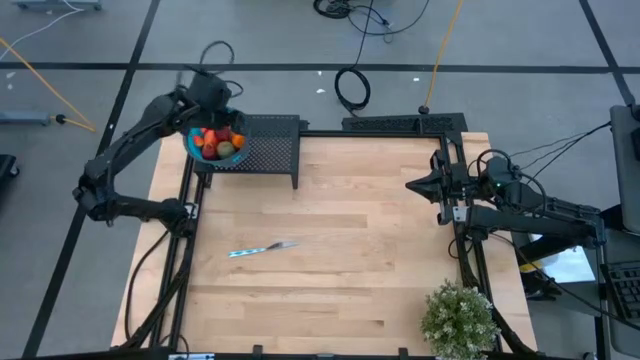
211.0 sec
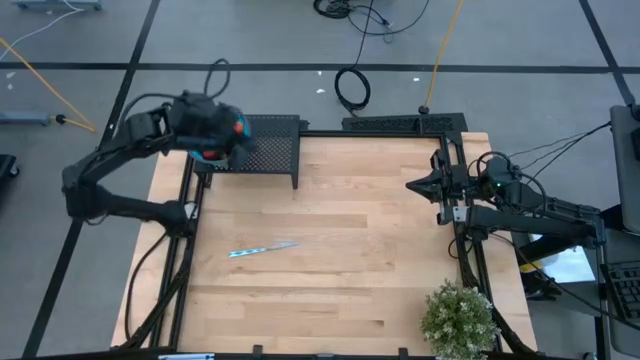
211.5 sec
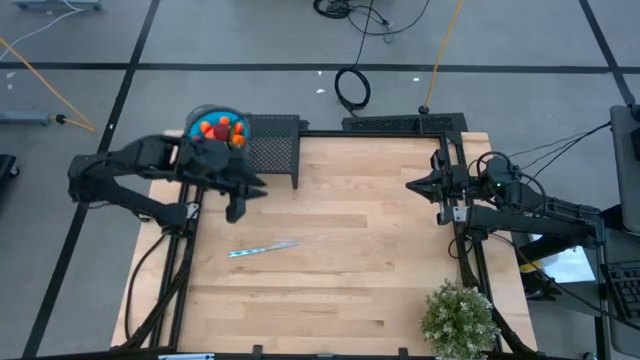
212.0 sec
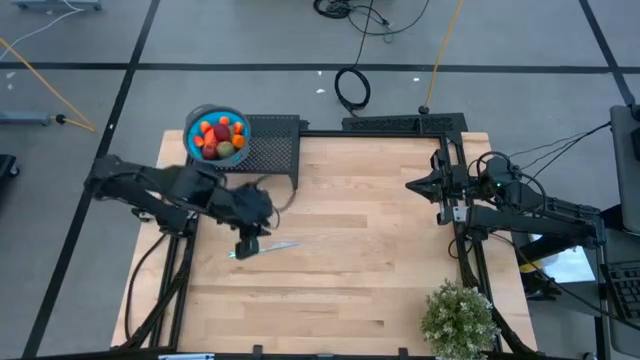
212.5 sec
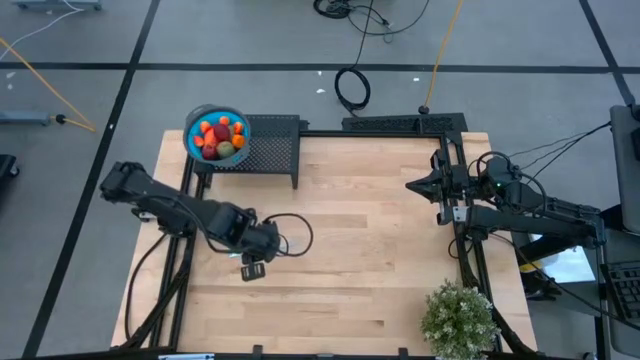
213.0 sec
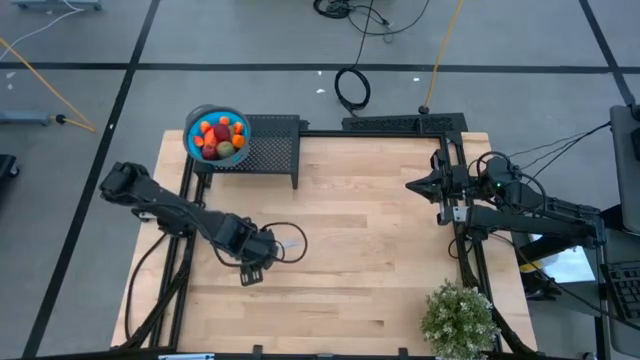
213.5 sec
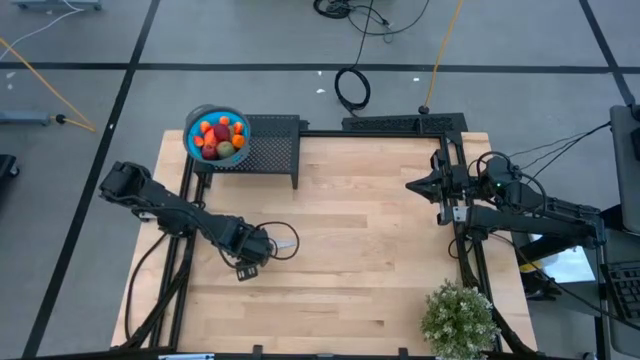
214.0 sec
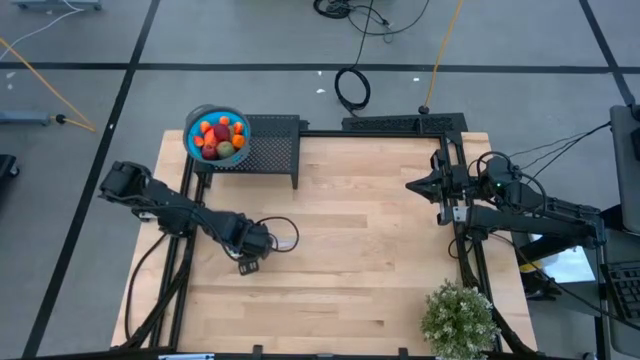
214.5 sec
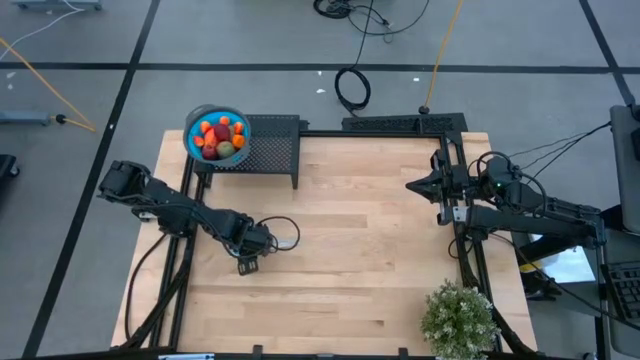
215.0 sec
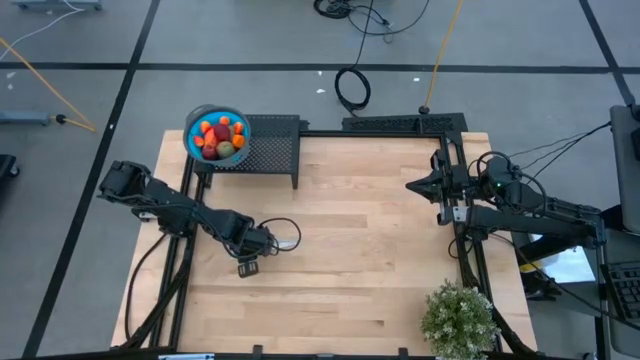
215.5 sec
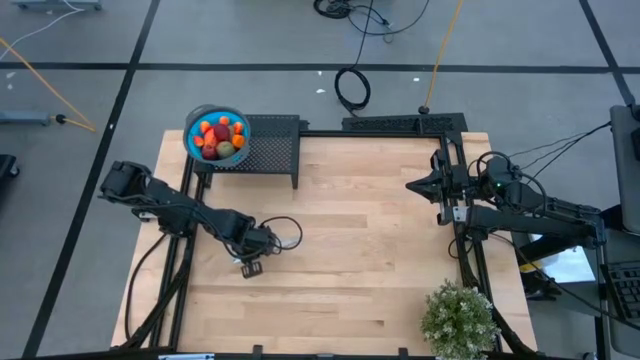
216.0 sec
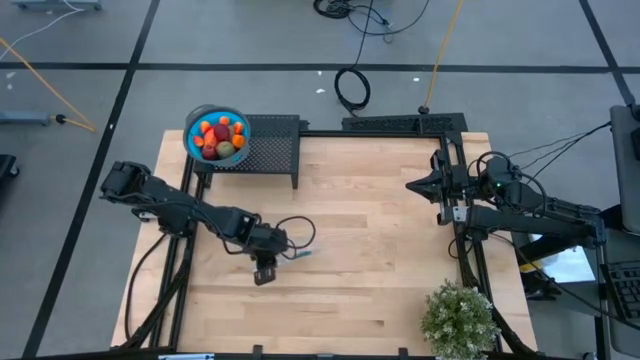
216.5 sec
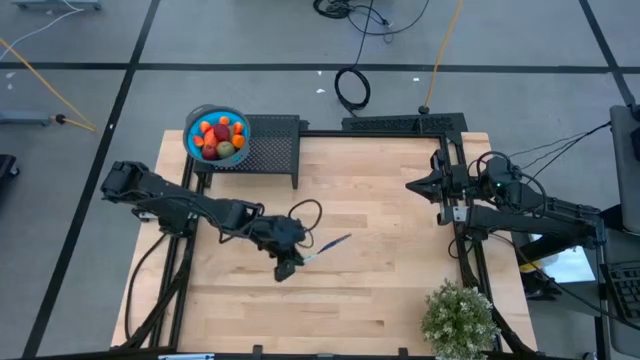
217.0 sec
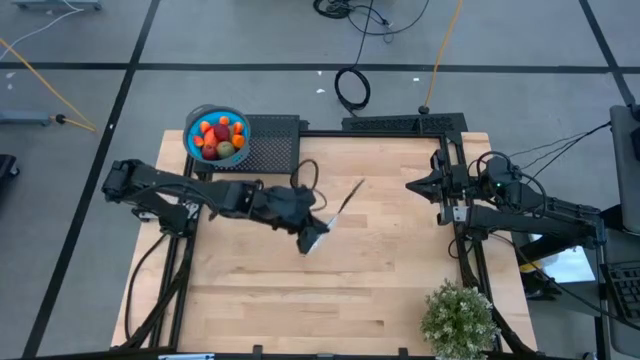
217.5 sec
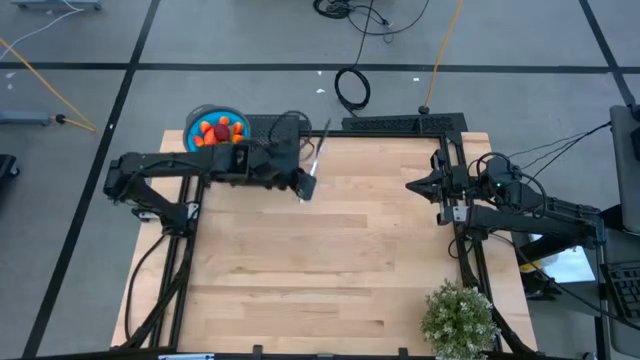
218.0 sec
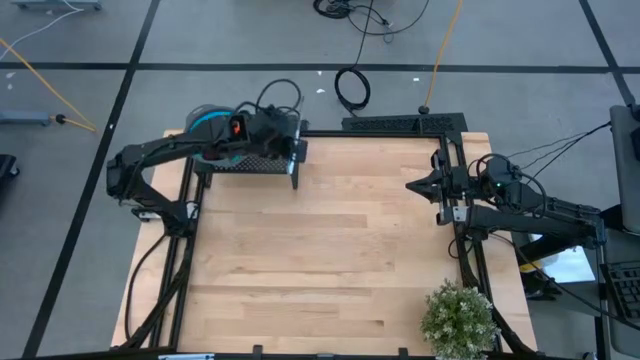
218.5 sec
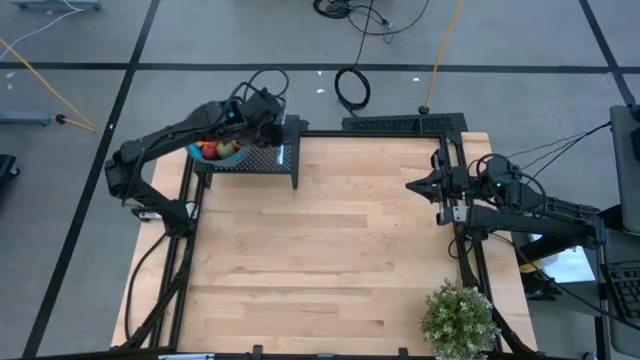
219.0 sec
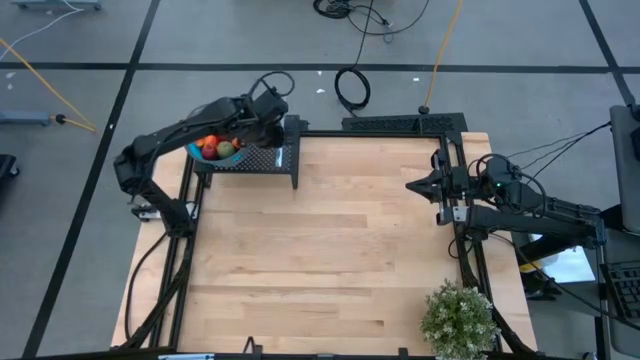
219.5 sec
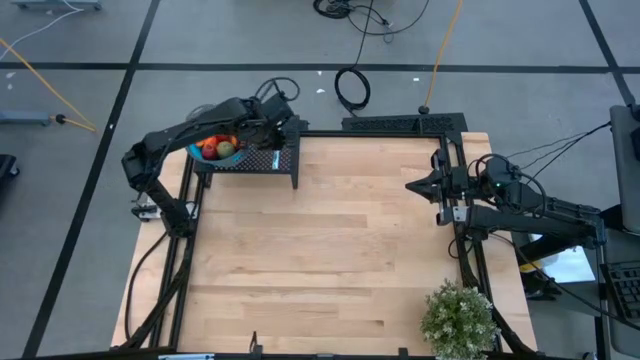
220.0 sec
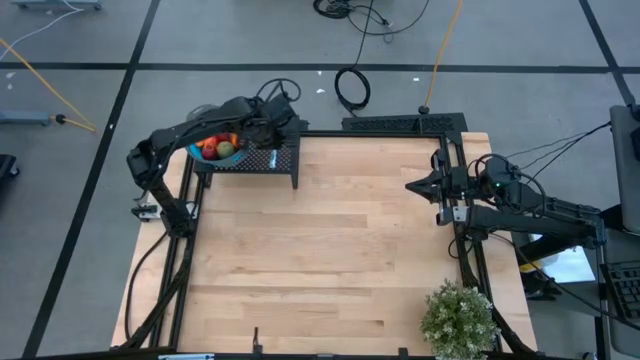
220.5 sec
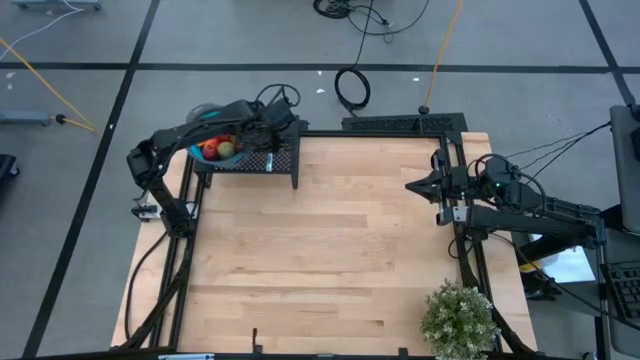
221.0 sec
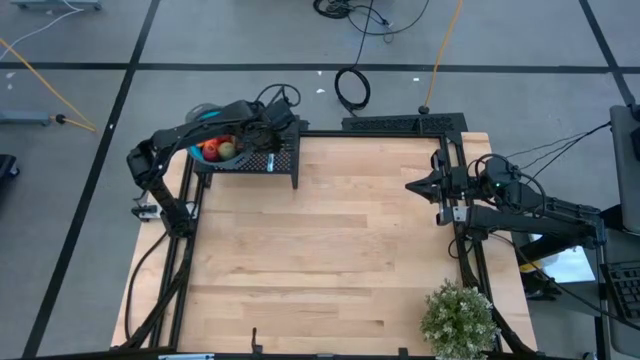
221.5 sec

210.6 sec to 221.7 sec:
Task: Pick & Place Fruit
Put the blue knife on the shelf

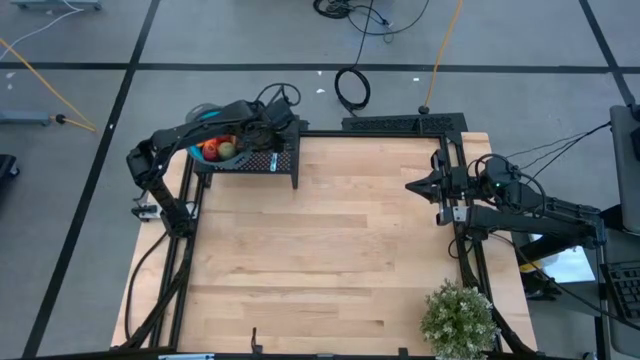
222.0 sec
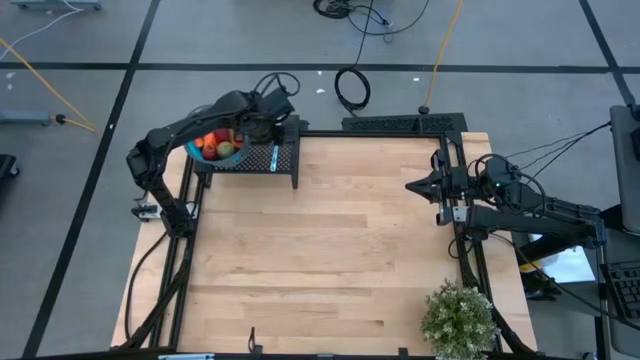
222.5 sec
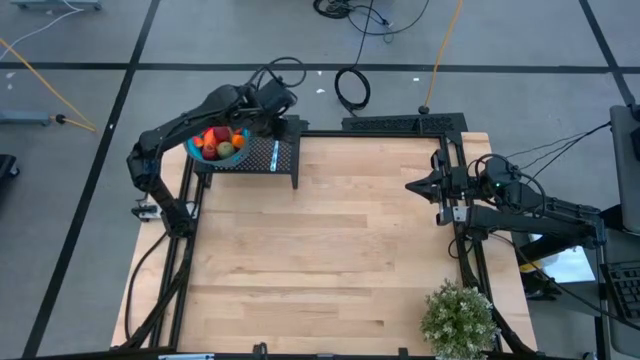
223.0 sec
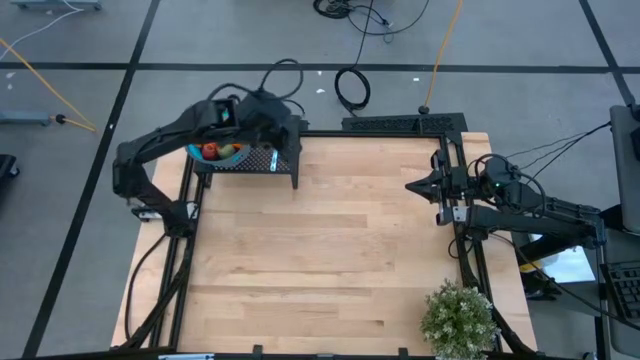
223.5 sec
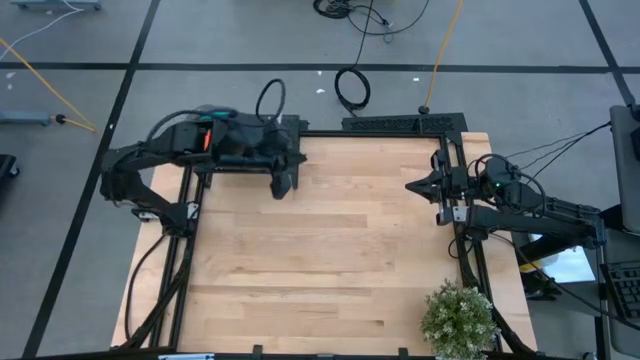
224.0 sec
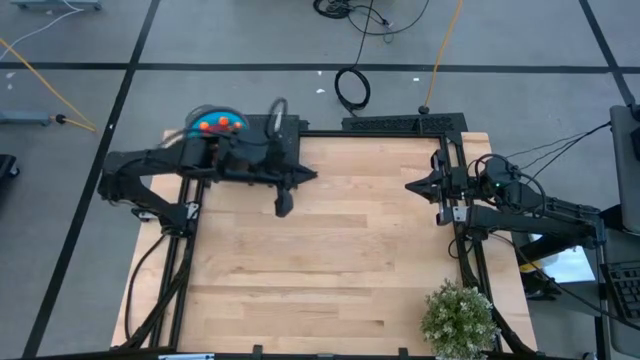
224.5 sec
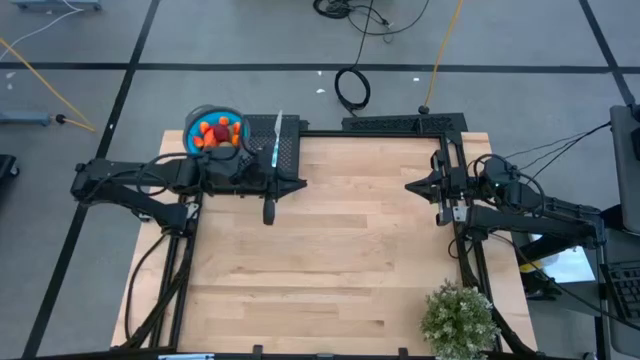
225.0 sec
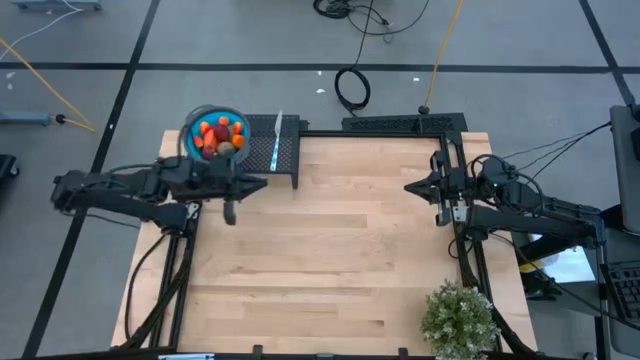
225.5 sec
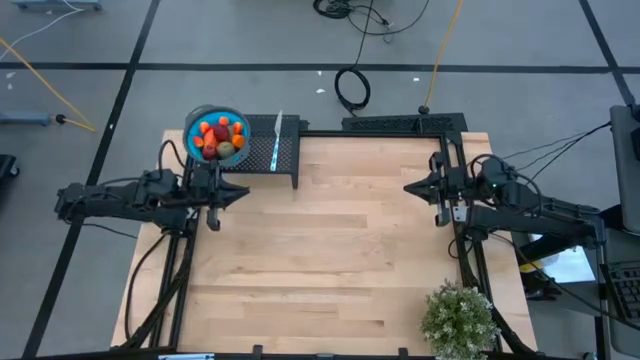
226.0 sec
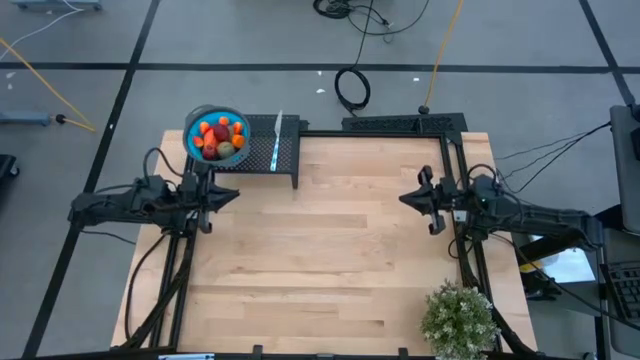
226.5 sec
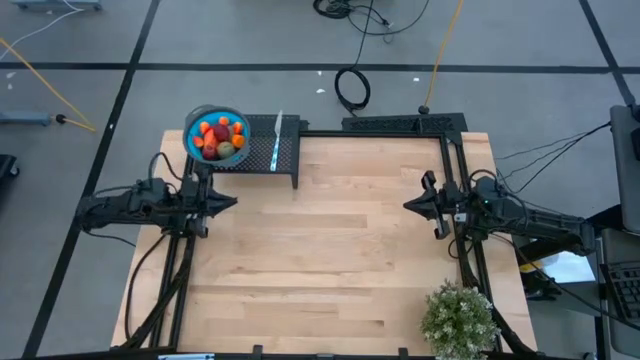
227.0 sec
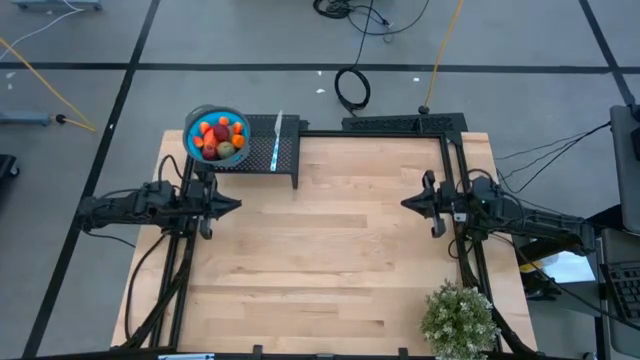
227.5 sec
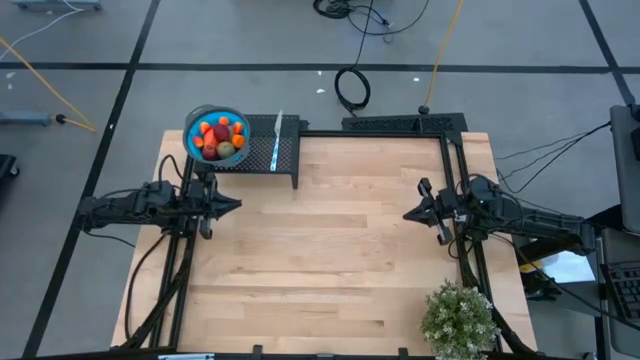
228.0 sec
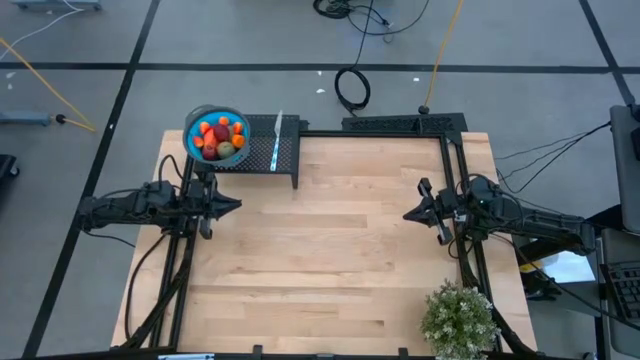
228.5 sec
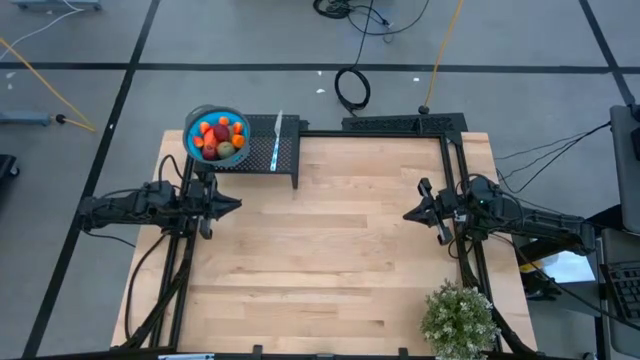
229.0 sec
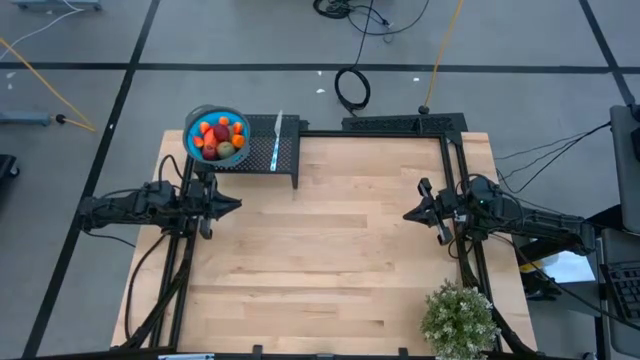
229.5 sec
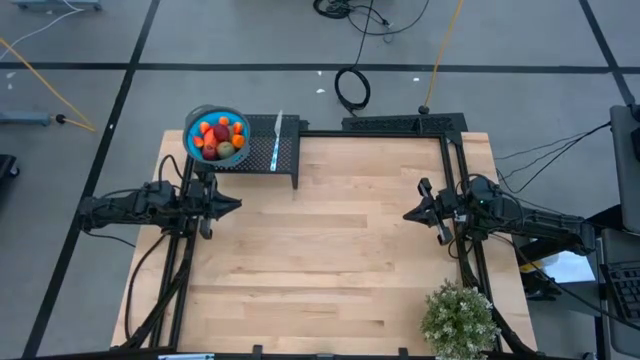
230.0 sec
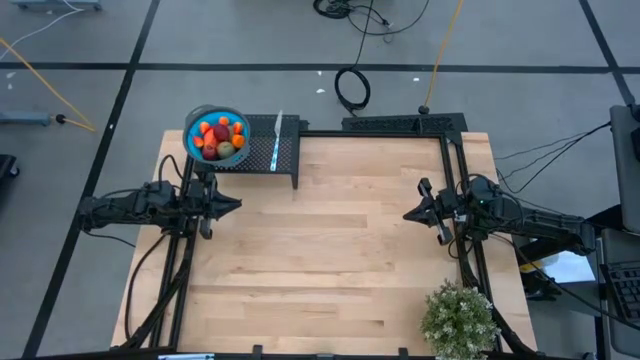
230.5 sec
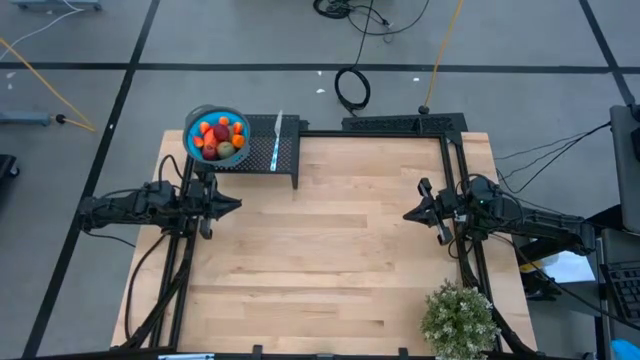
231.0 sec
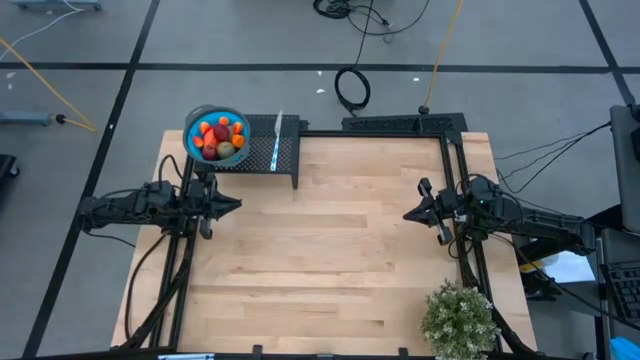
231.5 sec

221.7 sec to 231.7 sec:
Return To Home Position

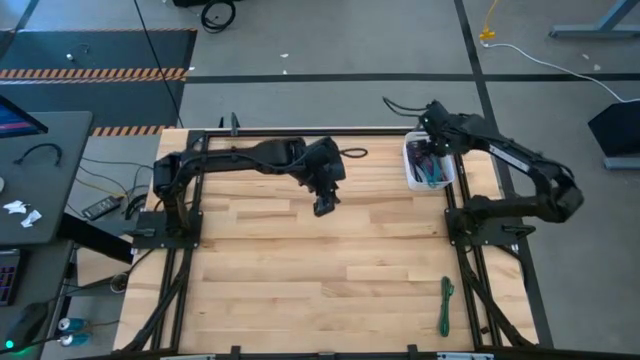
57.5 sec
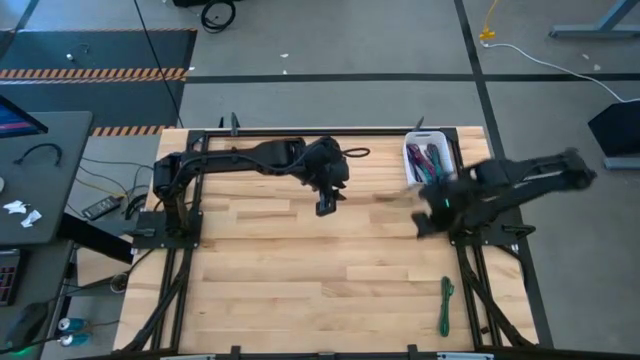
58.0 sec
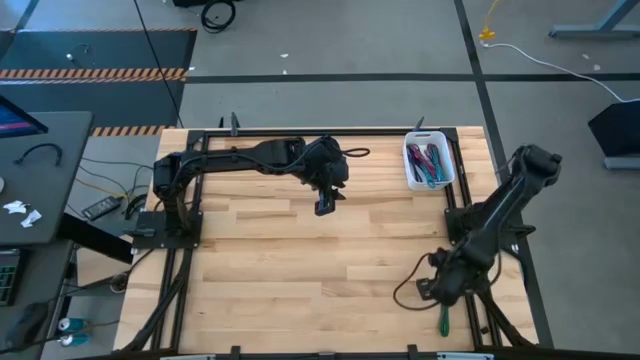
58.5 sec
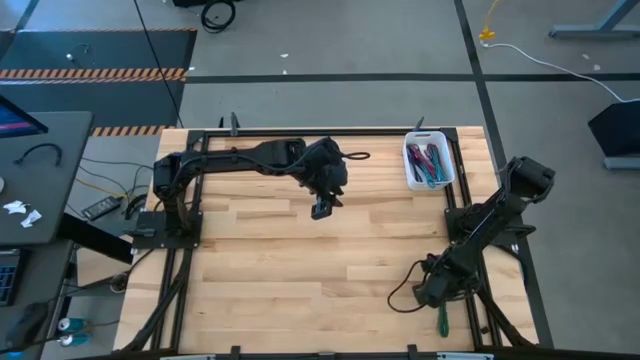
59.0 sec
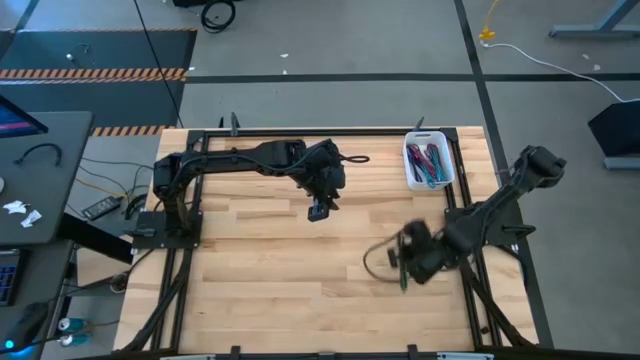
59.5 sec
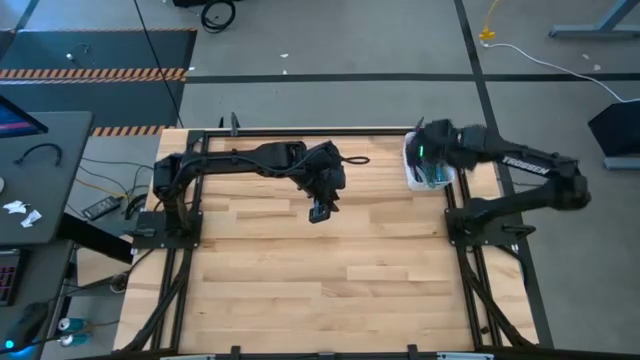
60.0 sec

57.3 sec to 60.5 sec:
Task: Pick and place USB-C Cables
Put the black green charger cable into the bin
